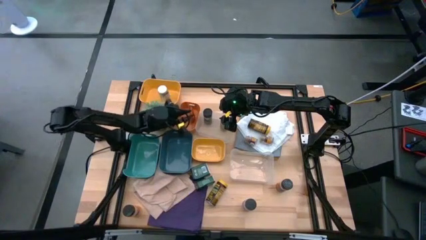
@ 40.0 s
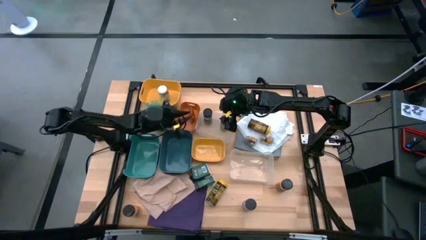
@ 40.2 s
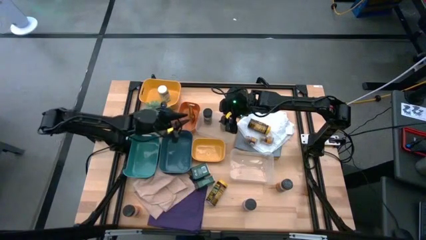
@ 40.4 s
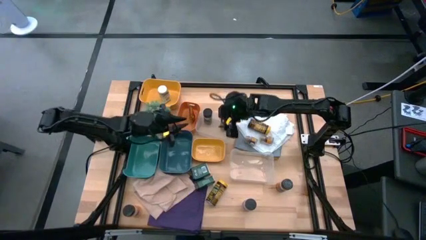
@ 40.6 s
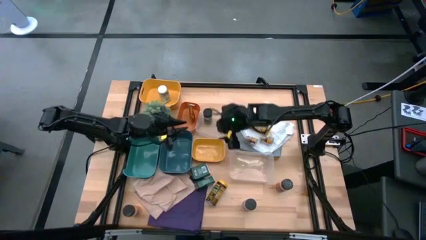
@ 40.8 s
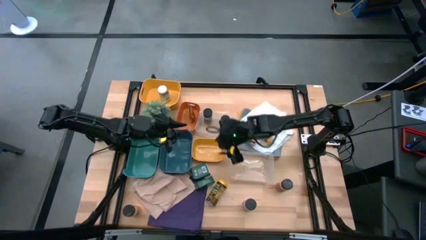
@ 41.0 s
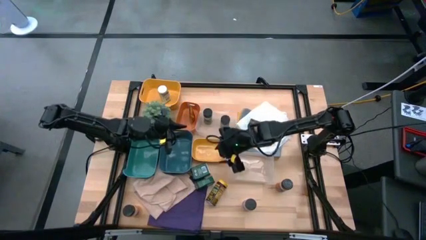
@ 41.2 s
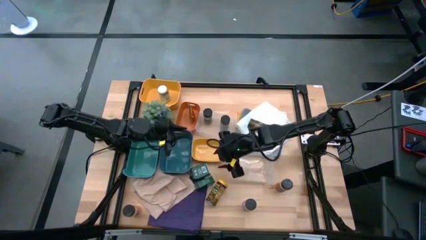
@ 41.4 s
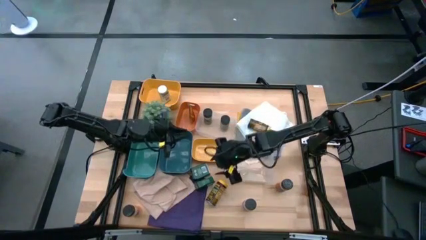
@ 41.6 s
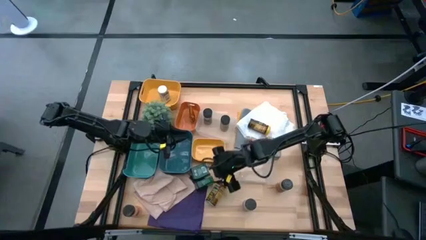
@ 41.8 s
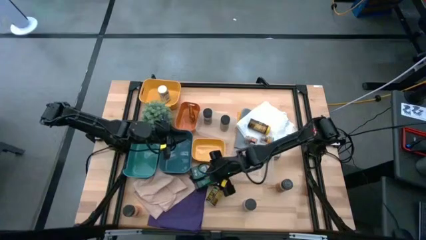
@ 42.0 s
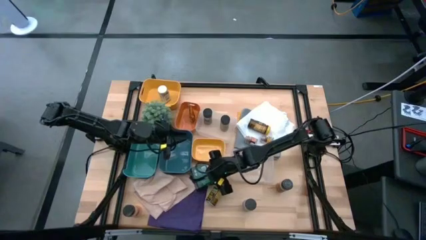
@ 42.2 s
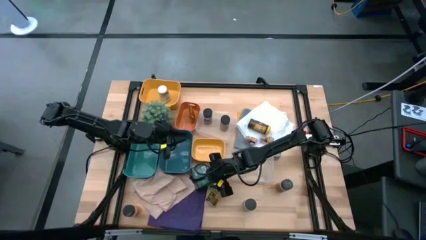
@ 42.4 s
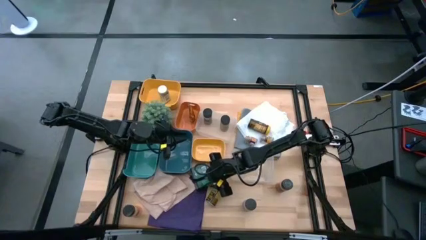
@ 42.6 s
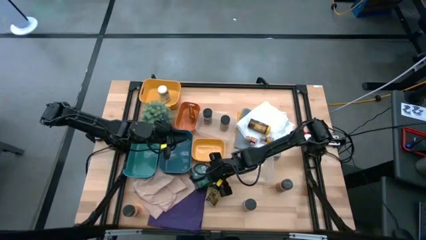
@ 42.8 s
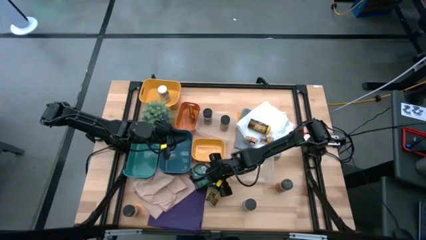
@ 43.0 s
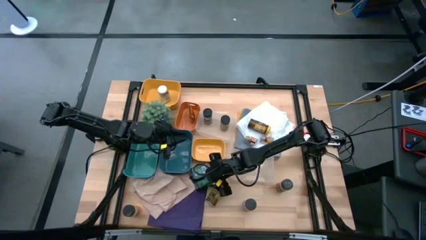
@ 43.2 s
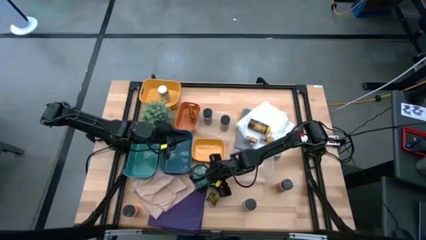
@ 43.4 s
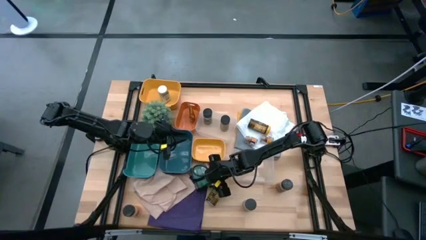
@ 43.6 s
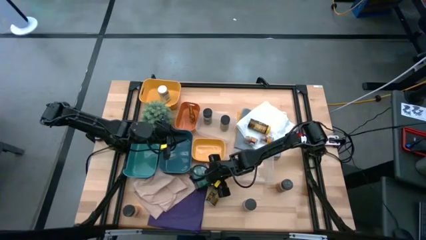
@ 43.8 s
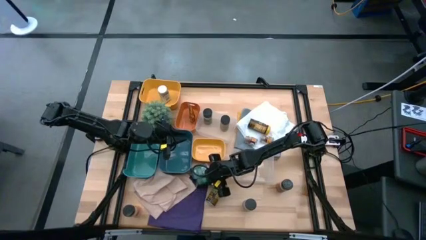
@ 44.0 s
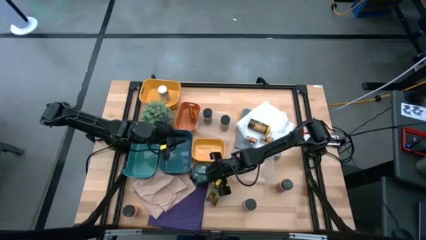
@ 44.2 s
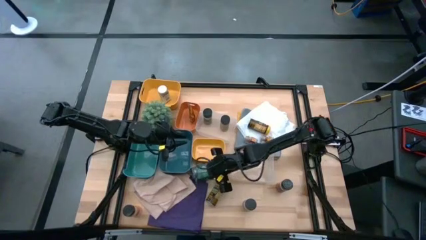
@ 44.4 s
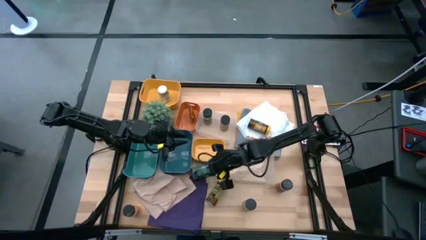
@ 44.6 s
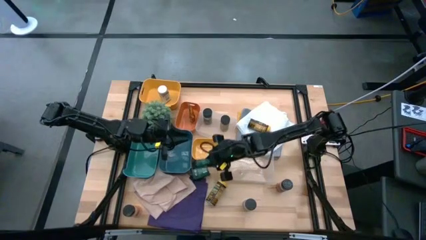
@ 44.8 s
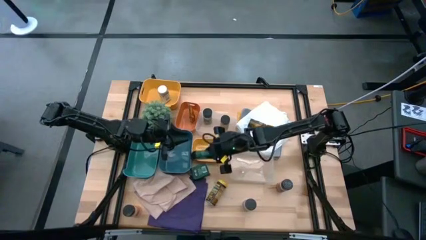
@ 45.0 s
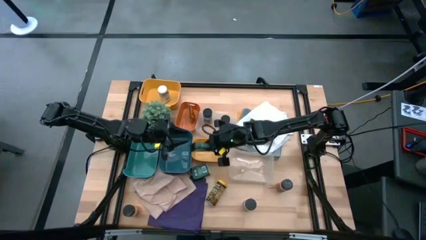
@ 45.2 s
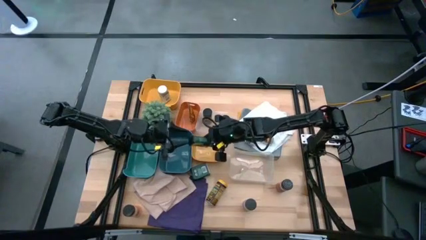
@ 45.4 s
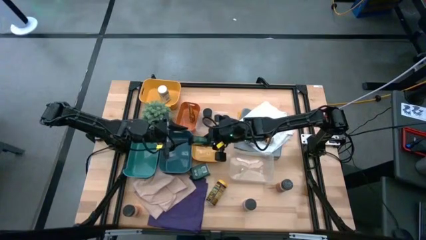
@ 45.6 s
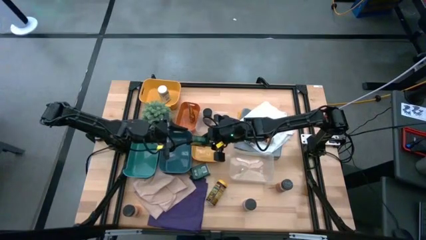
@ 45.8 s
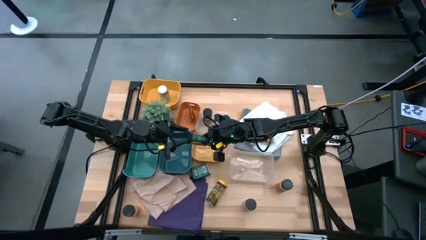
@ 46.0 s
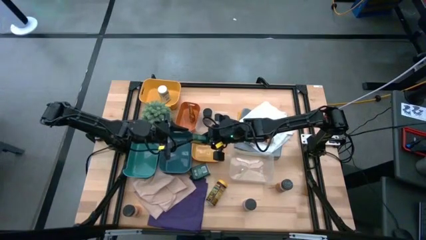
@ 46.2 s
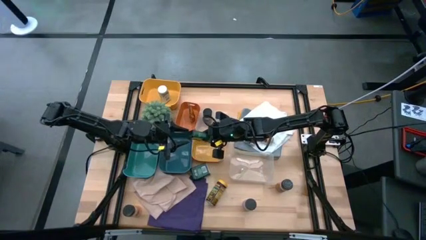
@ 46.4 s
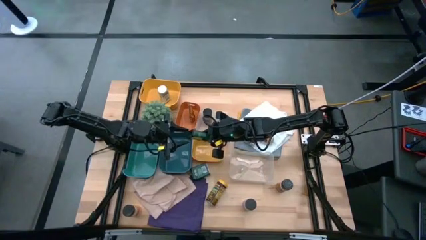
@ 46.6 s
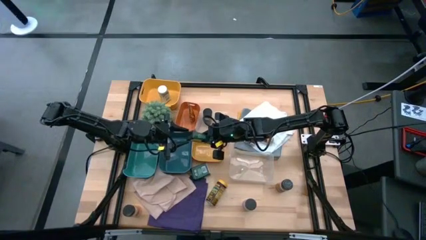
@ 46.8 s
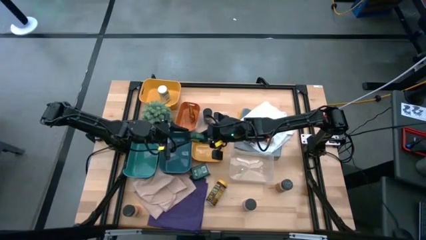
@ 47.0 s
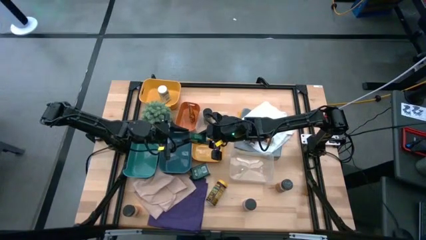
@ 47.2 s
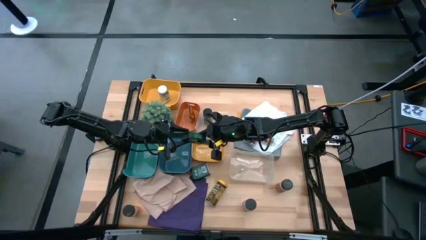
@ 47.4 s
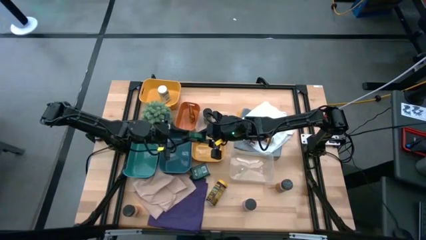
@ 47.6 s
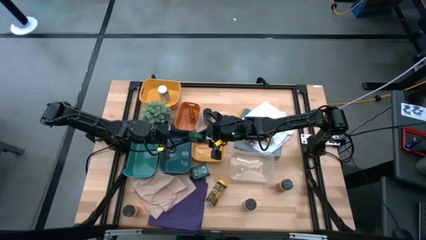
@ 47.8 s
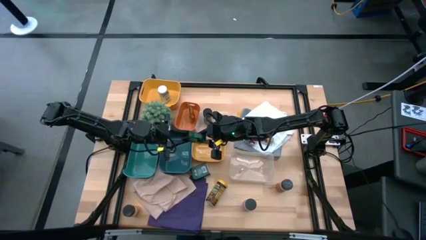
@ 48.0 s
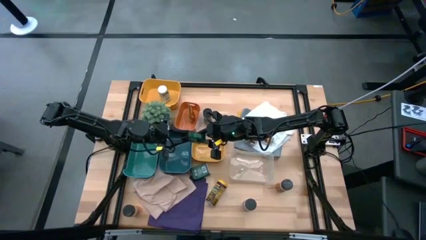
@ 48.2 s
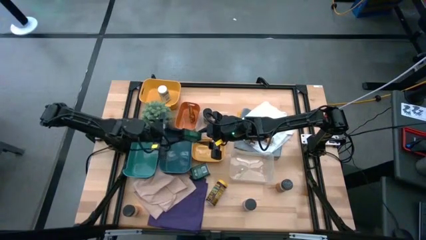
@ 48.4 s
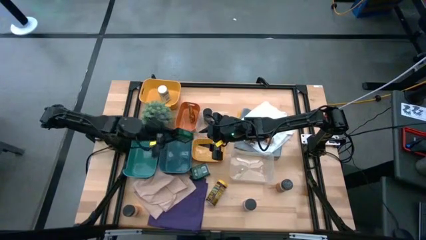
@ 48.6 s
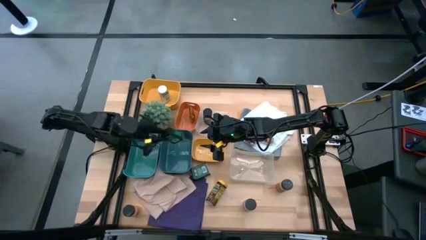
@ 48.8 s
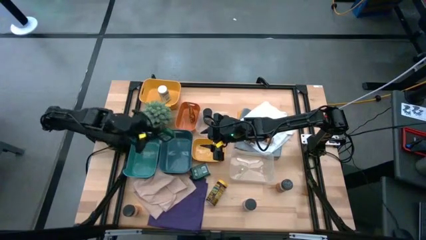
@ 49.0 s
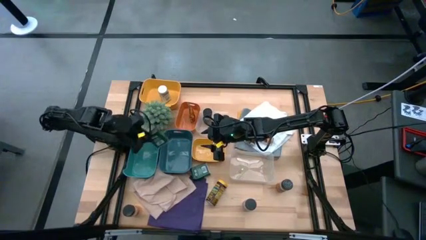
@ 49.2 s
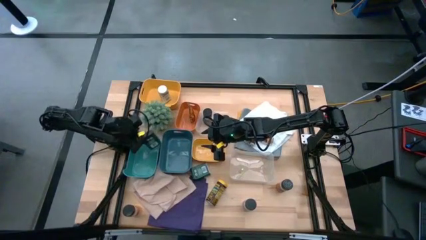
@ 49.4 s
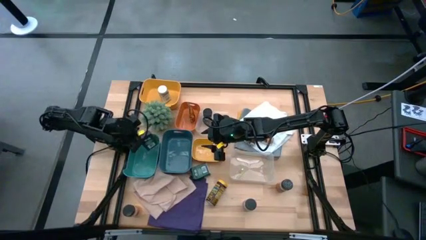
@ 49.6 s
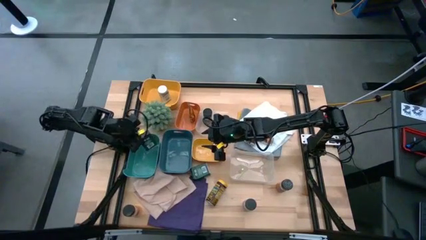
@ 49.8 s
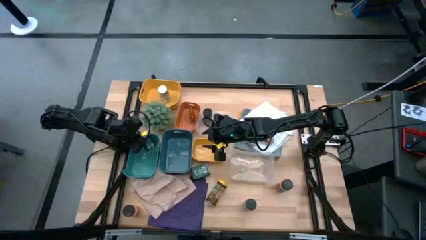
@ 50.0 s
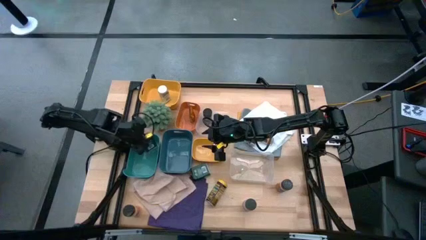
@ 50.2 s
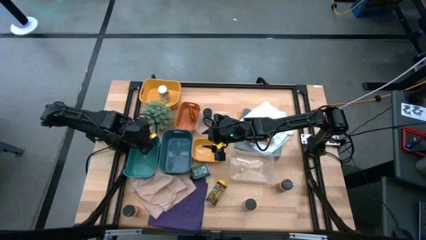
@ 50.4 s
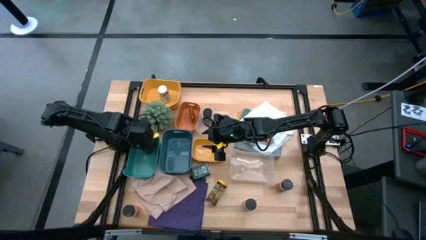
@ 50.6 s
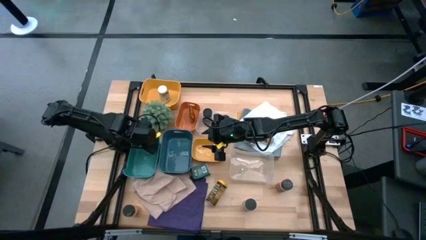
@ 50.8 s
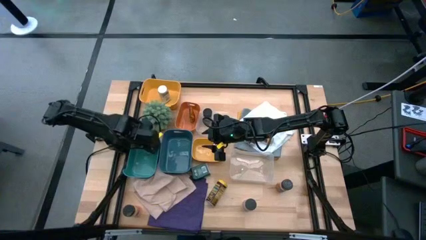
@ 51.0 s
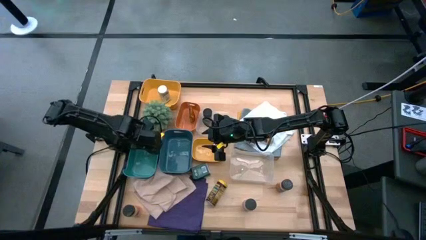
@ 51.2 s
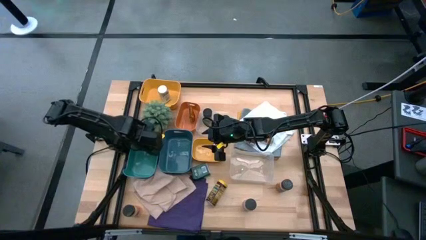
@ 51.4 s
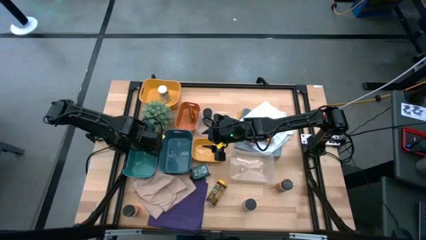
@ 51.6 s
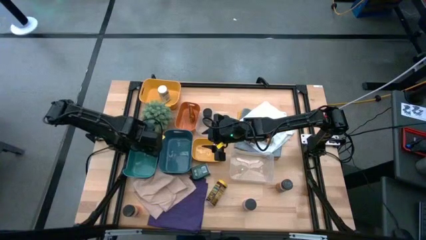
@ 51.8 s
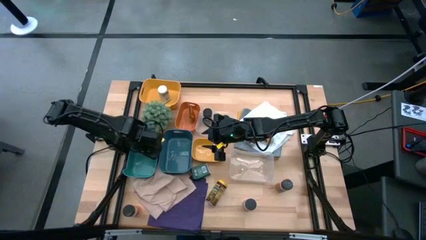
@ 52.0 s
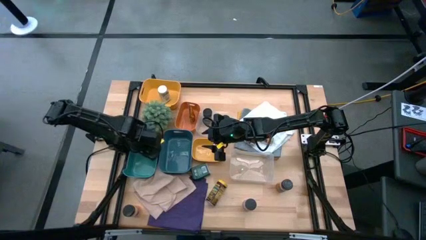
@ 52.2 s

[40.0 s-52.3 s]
Task: Sort spices by type
Put the bottom green seasoning can into the green bin

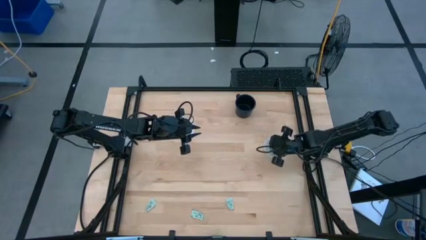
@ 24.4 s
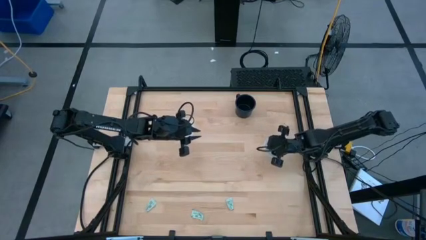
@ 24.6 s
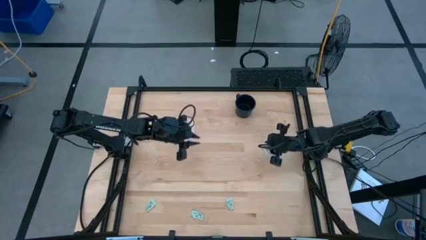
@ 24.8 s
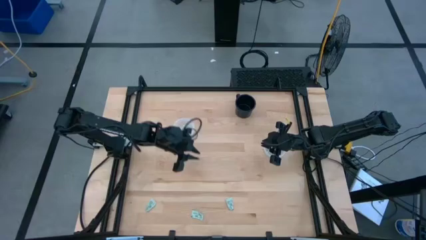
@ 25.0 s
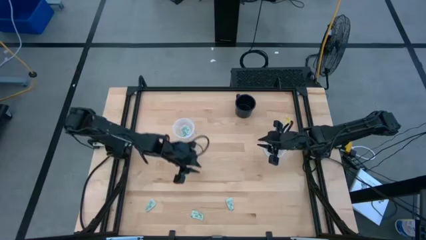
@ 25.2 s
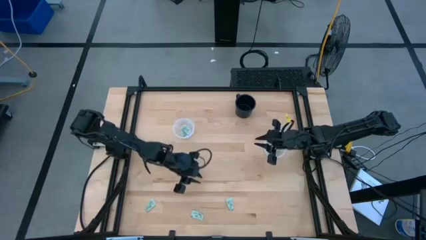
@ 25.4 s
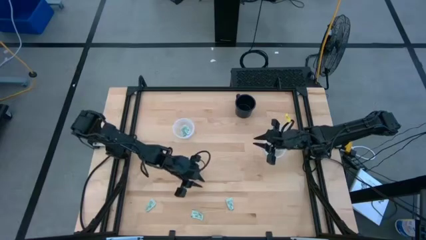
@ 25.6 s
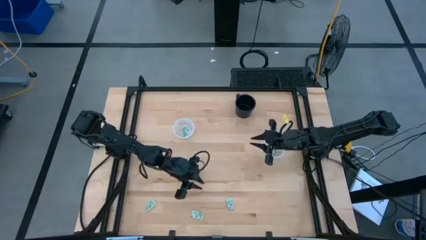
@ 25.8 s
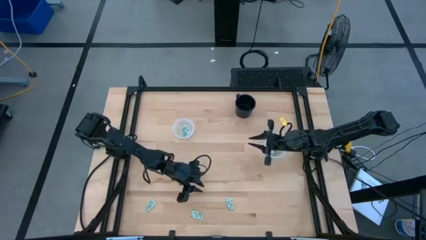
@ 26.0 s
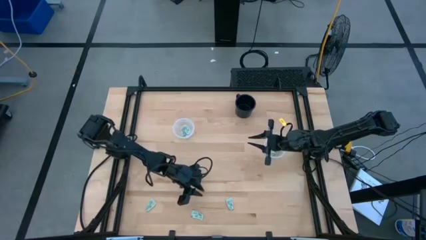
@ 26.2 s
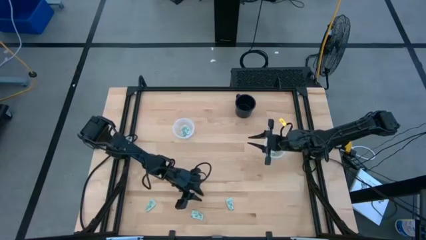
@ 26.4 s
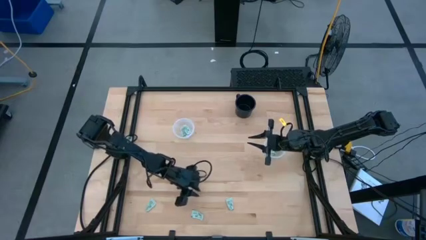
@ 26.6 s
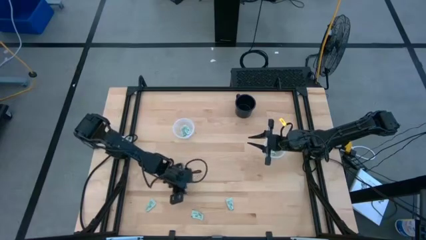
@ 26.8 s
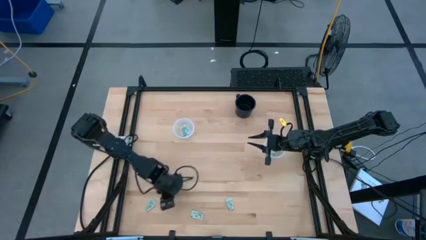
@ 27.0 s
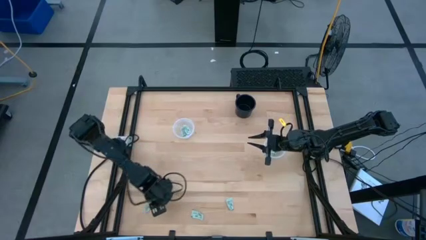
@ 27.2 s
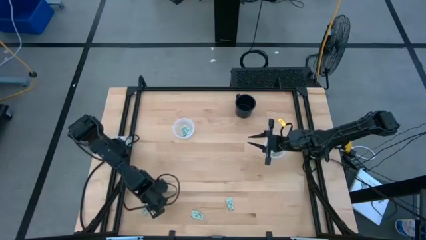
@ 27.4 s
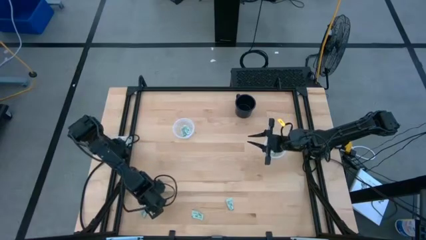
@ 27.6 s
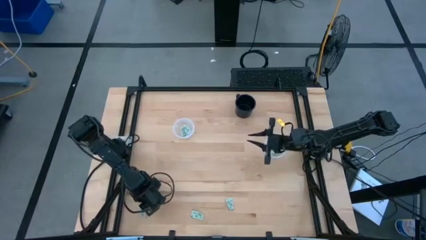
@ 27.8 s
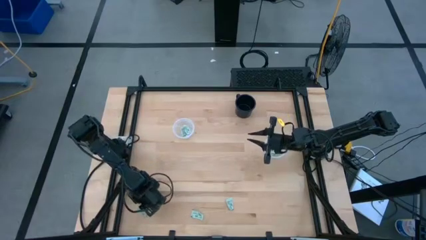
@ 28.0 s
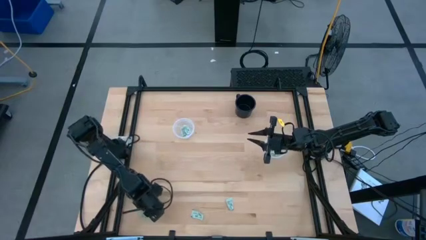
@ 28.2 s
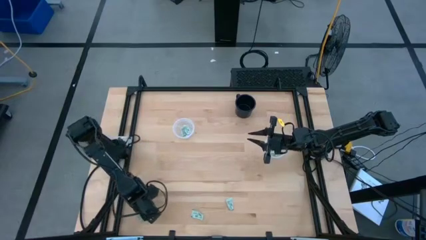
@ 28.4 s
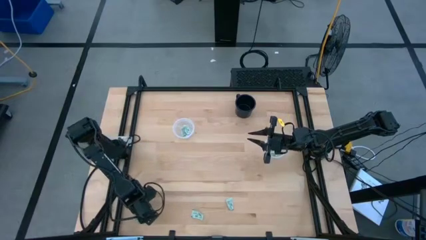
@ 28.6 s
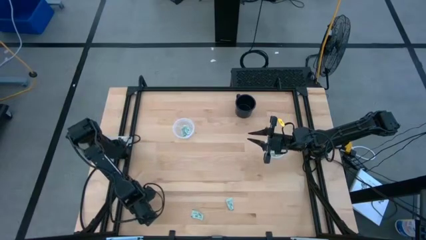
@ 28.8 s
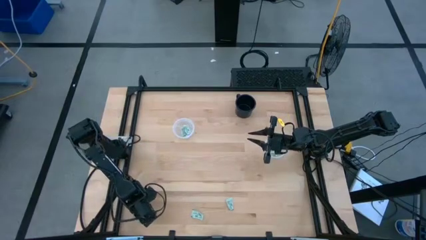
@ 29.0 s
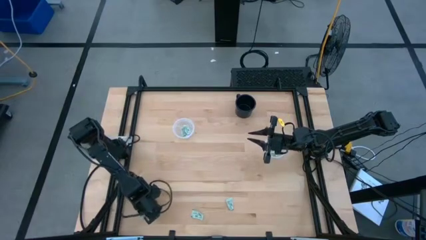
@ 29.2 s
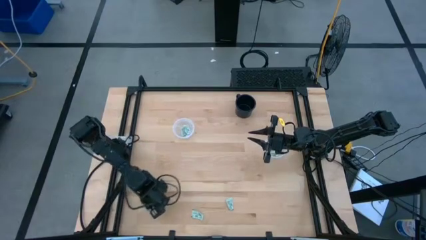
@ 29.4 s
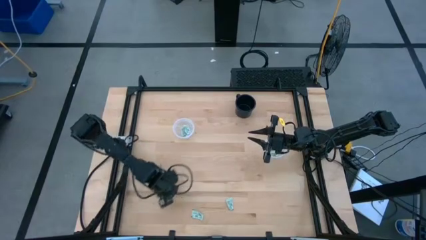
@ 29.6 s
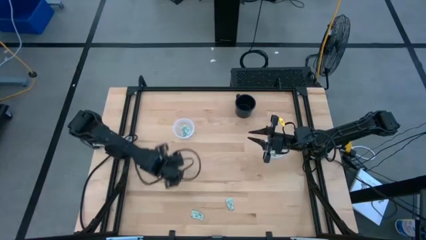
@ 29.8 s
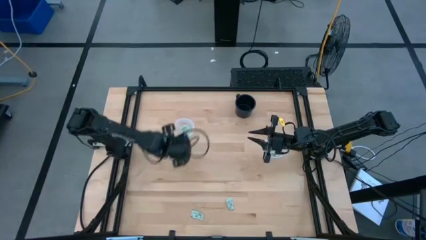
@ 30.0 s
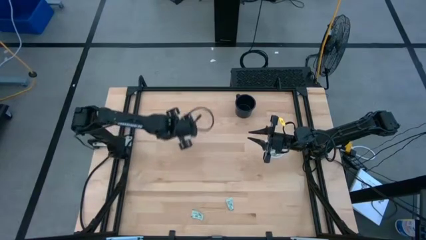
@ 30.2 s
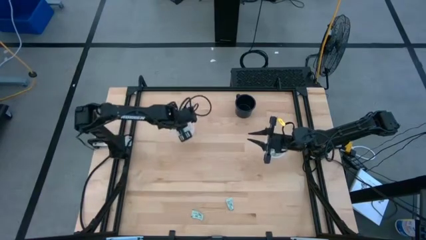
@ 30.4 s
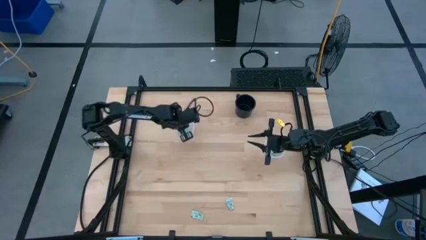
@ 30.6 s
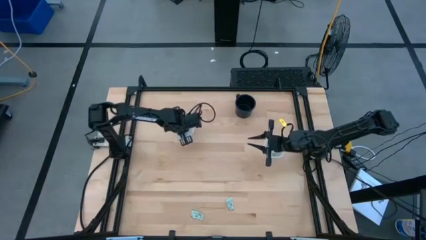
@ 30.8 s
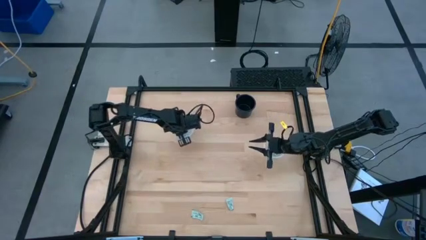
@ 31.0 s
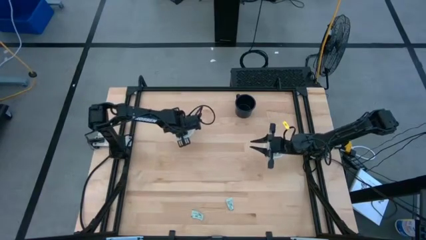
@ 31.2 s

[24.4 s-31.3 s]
Task: Pick and place items into bin
Put the white stevia packet into the left transparent bin
